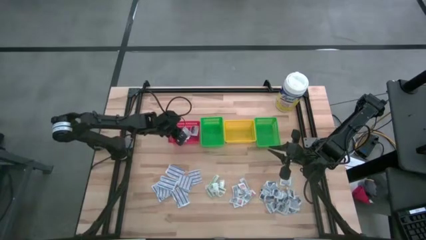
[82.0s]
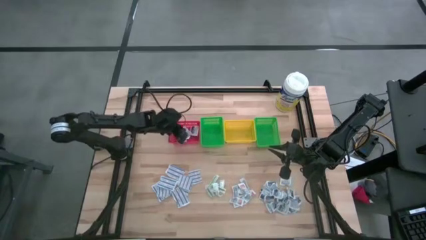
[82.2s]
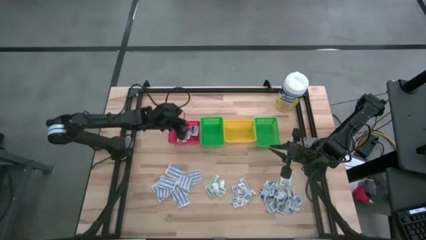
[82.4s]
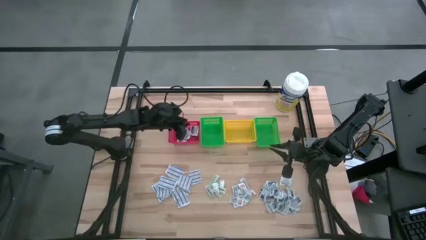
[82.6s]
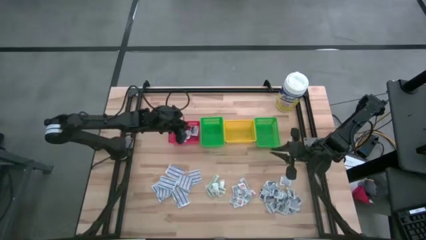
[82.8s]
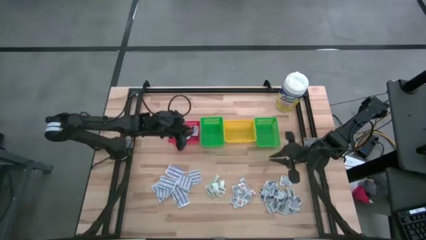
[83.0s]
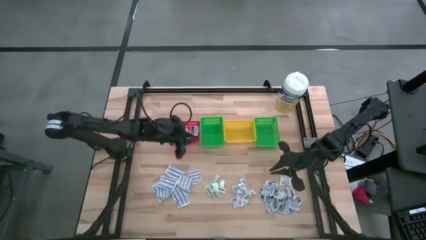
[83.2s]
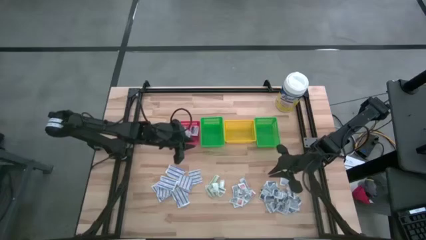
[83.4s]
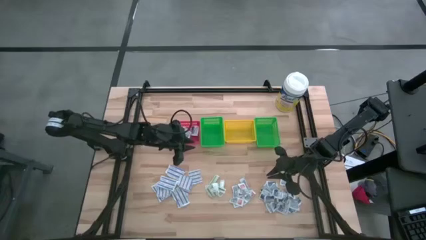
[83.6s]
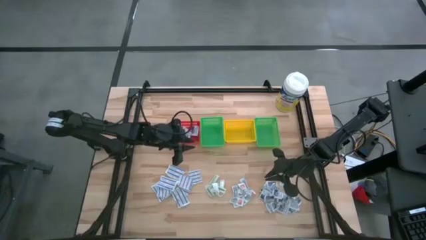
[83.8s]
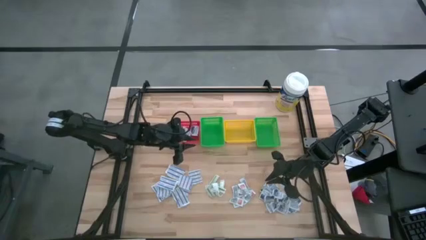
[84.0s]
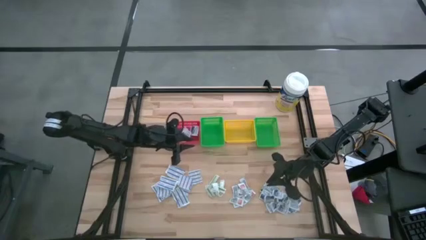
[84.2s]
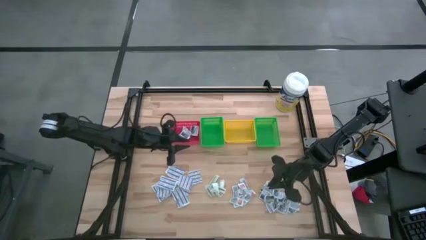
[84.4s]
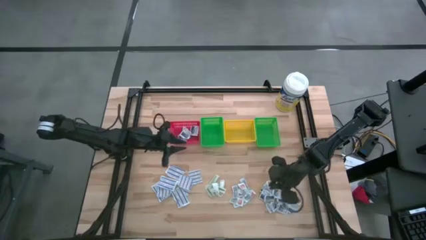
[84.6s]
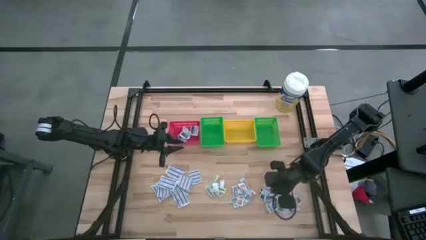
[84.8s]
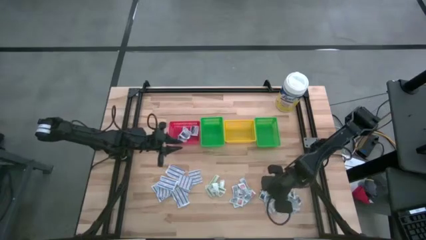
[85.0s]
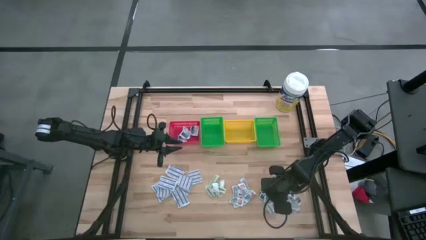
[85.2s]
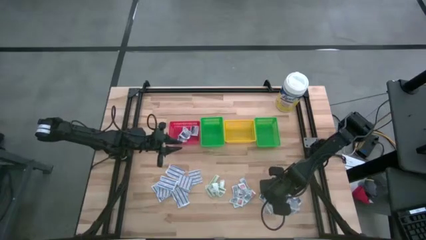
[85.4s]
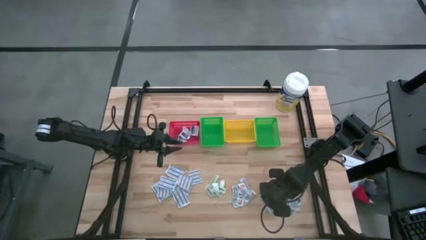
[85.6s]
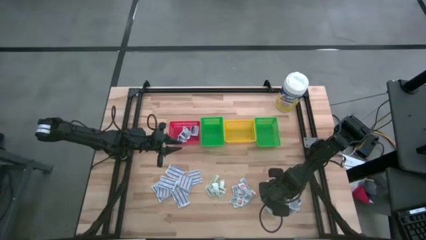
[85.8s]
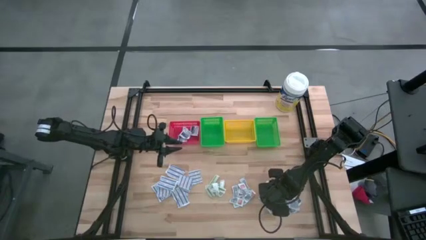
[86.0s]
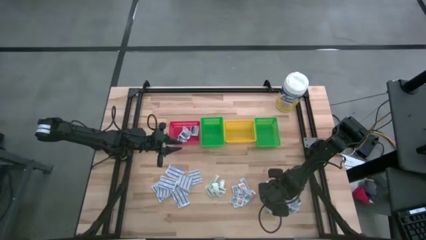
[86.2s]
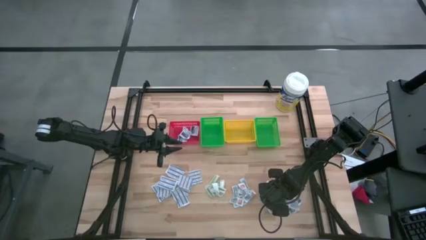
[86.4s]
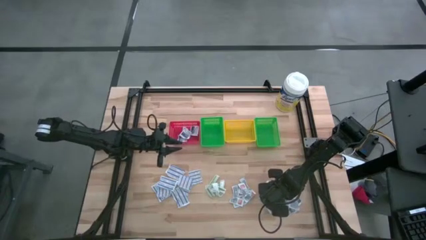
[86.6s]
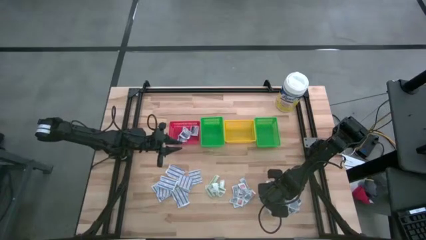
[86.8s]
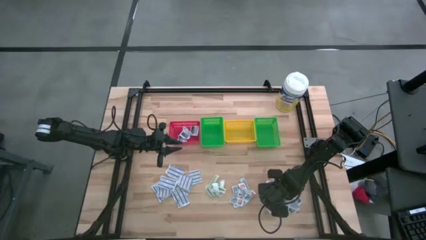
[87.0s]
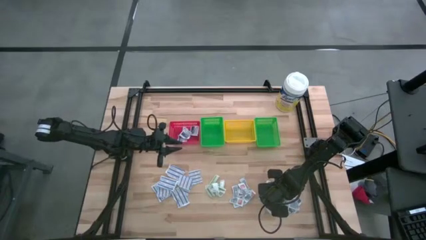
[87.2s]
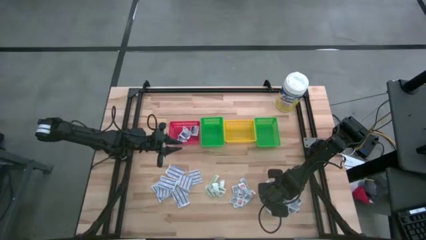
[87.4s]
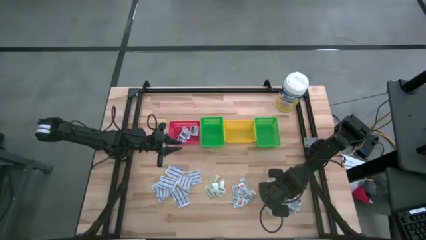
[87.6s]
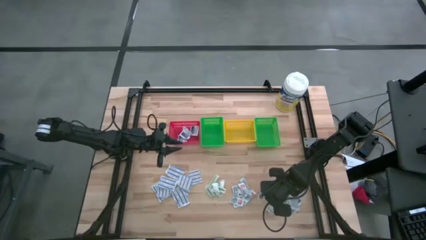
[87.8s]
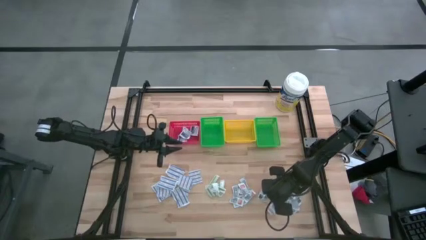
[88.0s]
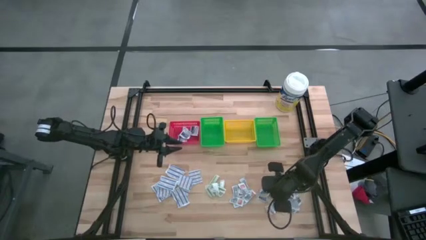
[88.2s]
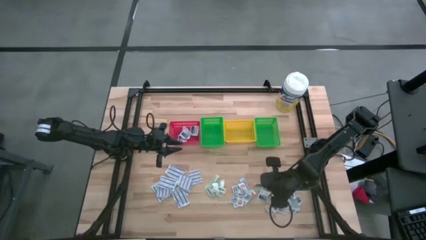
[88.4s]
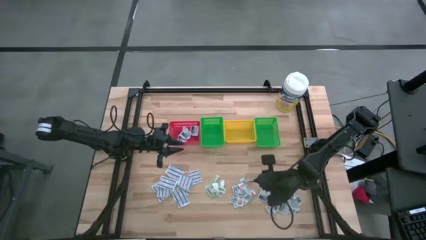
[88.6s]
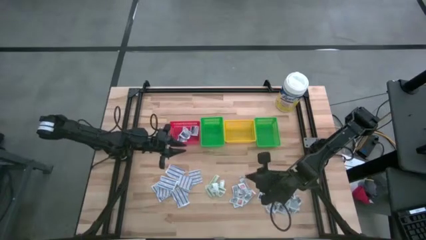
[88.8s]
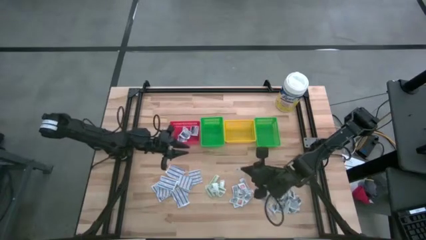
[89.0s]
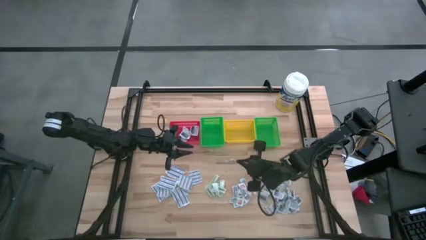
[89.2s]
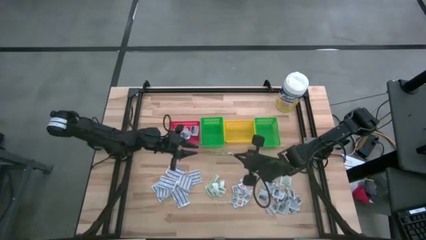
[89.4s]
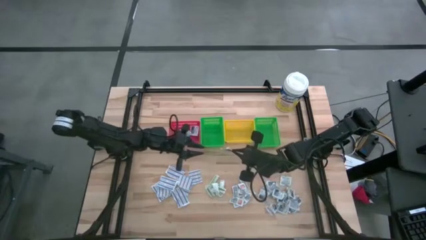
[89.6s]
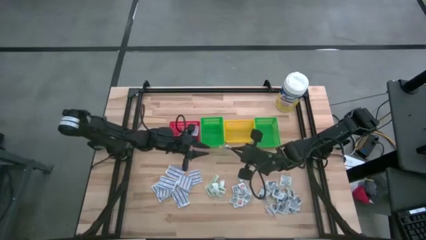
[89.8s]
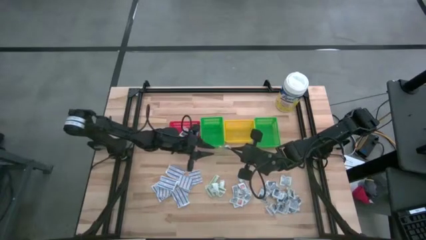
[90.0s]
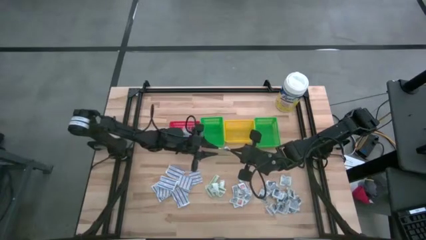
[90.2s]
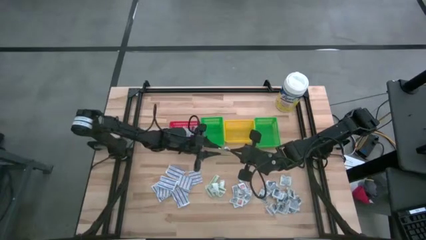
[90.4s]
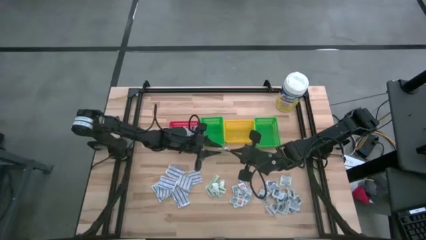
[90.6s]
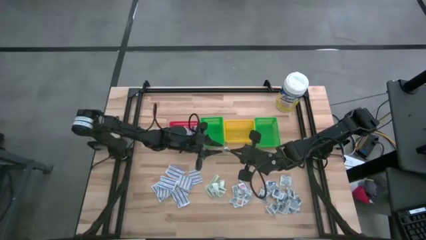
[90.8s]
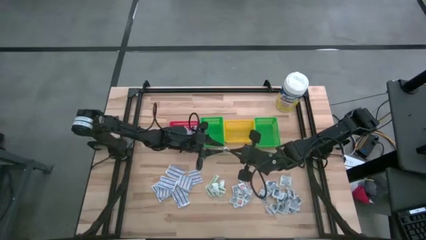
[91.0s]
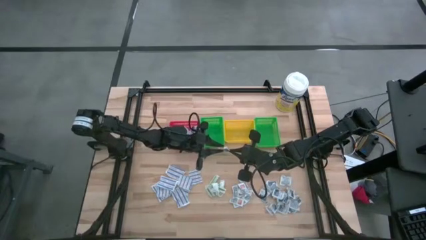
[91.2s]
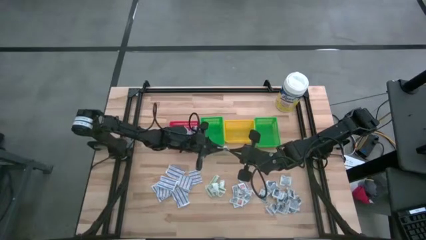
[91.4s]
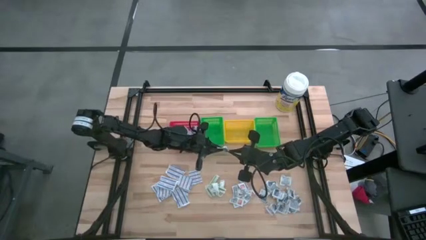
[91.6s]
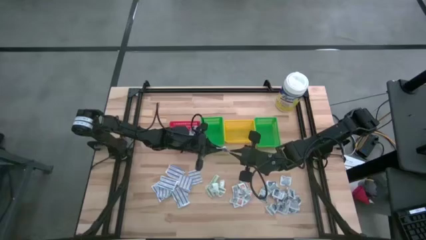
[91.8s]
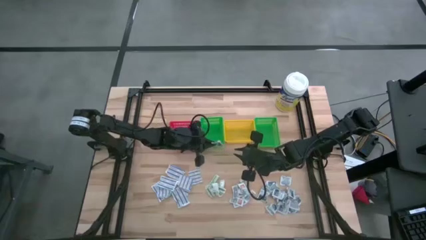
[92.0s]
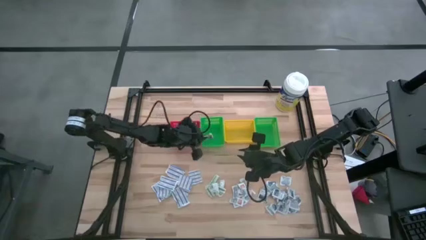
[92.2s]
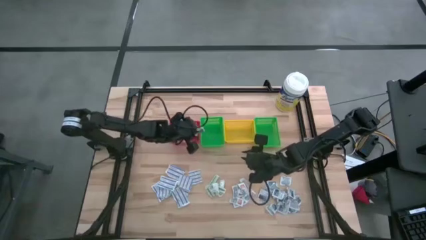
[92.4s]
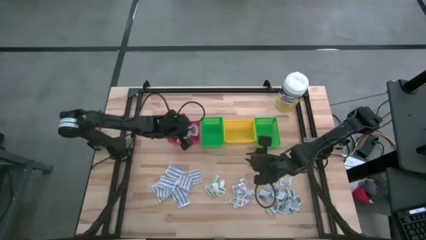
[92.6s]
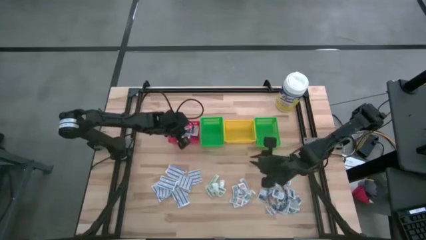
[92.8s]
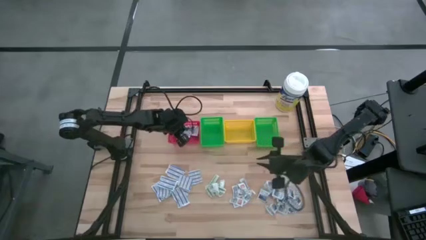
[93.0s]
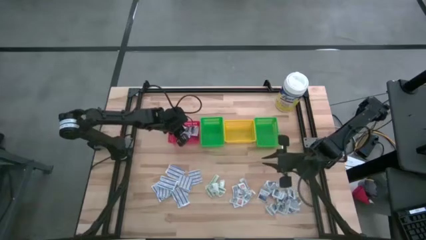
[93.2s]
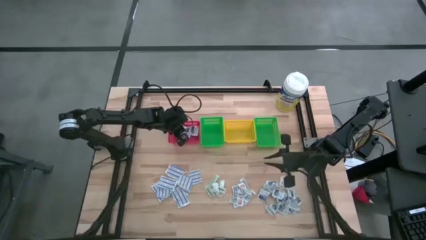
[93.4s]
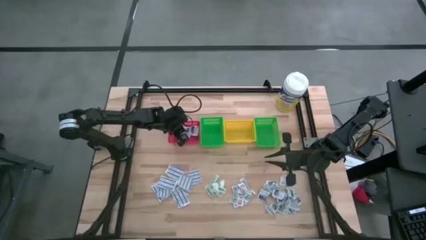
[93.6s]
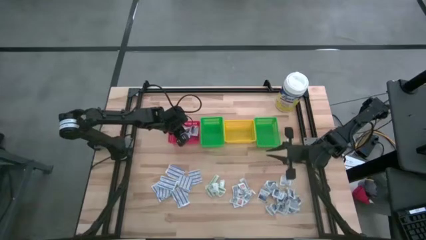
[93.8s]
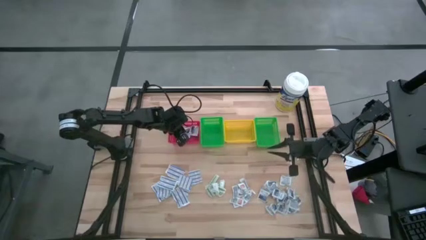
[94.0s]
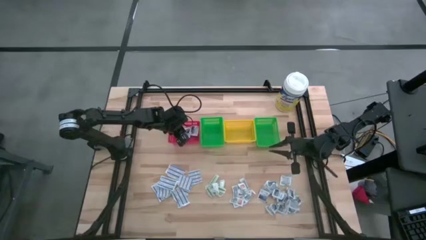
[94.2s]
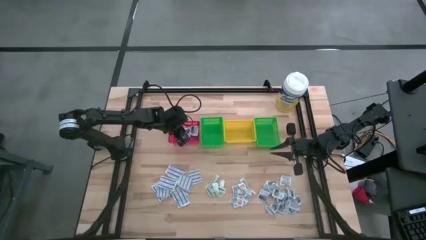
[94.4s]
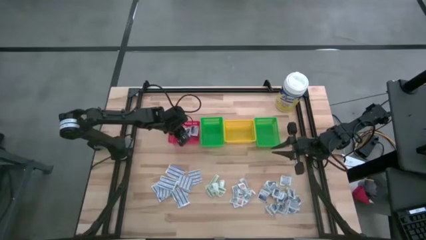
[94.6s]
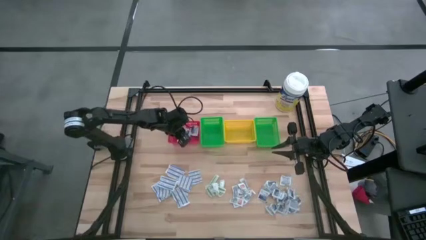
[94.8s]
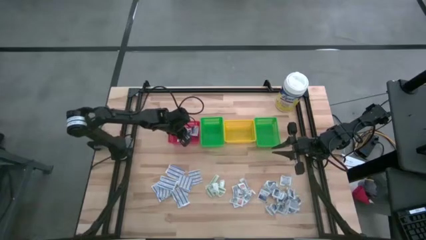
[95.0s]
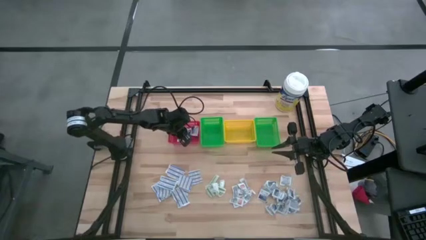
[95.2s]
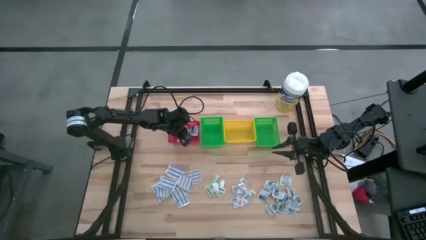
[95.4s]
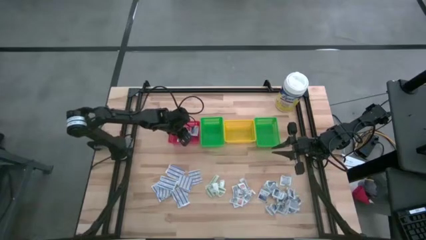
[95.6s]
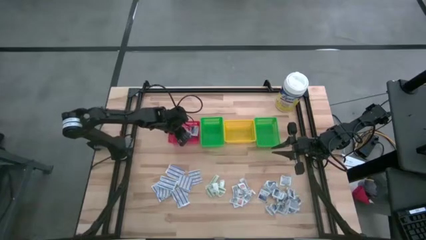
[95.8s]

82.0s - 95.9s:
Task: Pick & Place First Aid Supplies
Put the alcohol pad into the red basket
